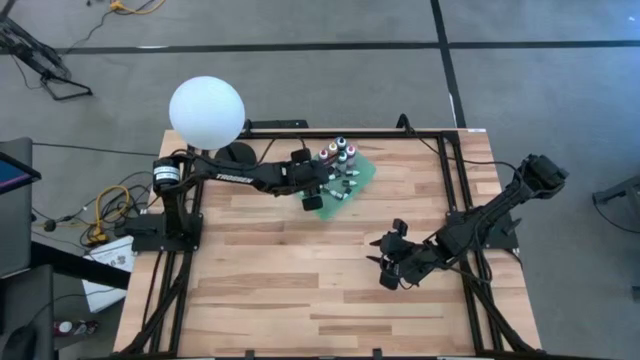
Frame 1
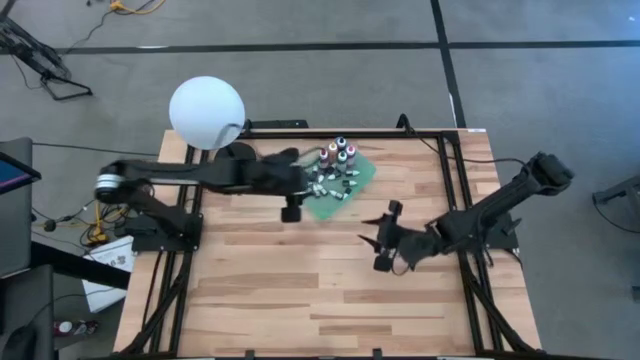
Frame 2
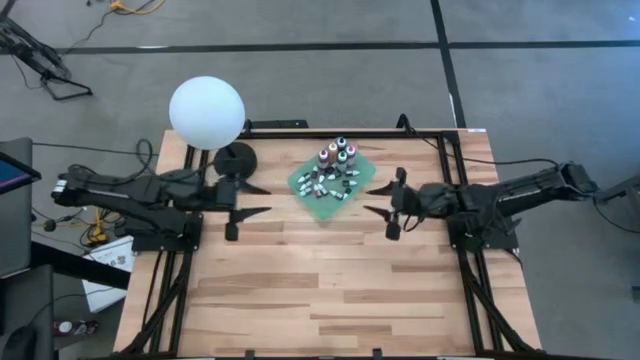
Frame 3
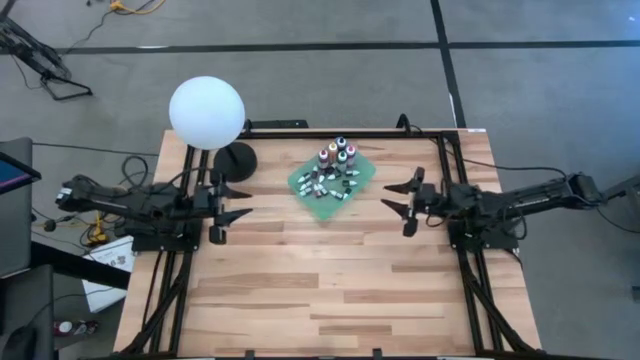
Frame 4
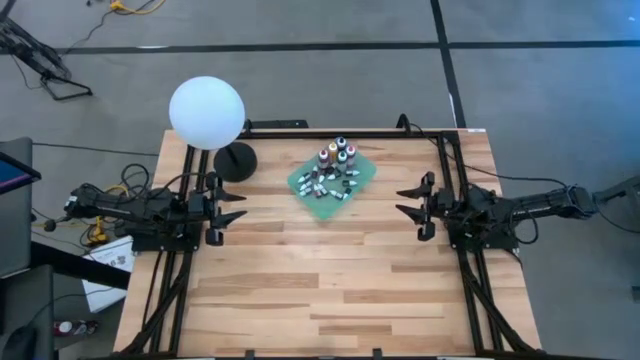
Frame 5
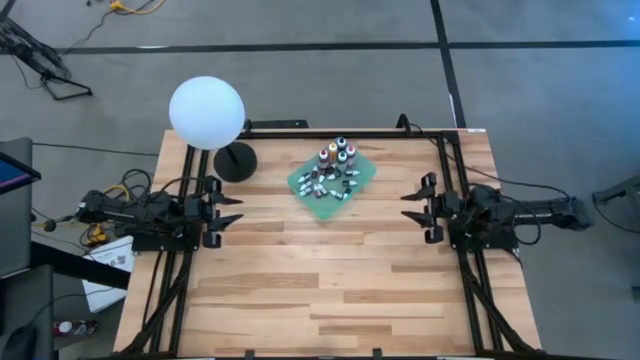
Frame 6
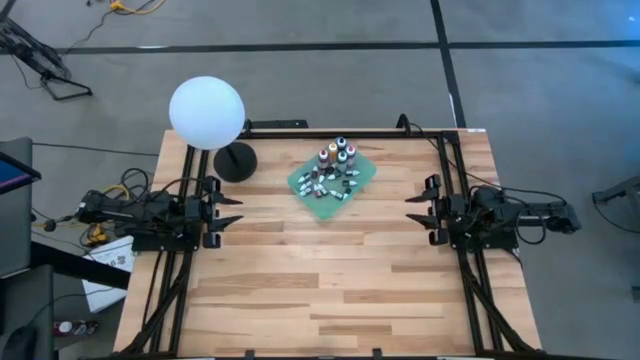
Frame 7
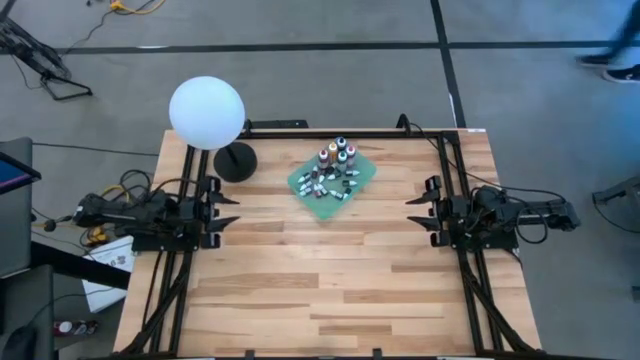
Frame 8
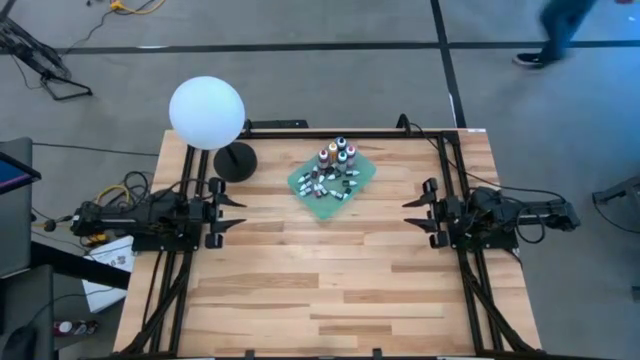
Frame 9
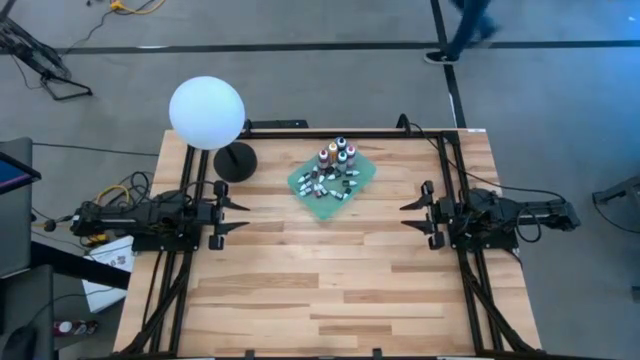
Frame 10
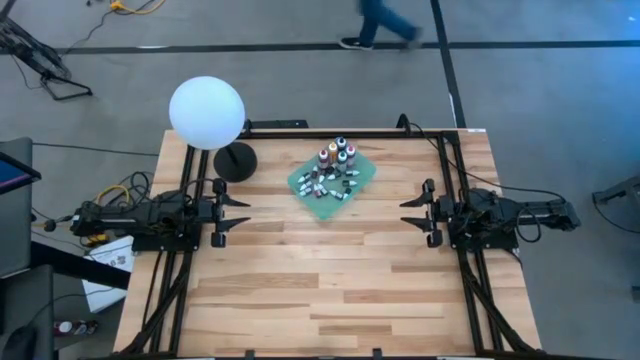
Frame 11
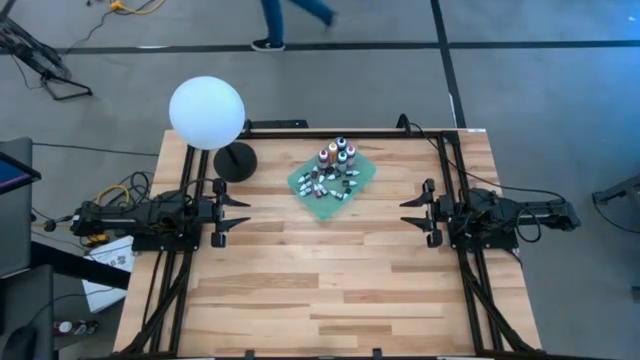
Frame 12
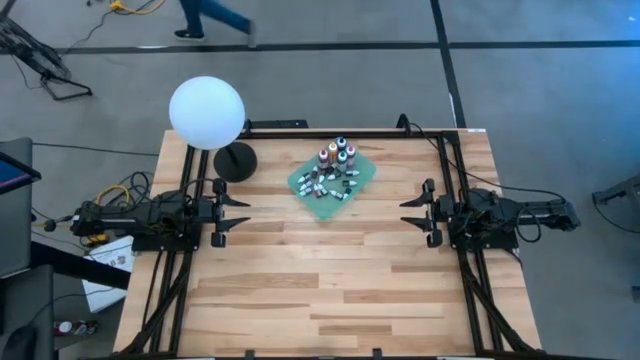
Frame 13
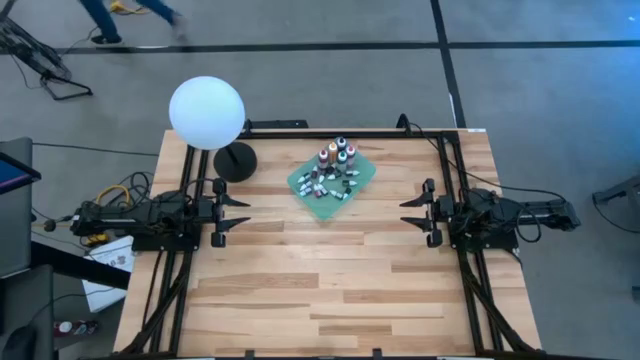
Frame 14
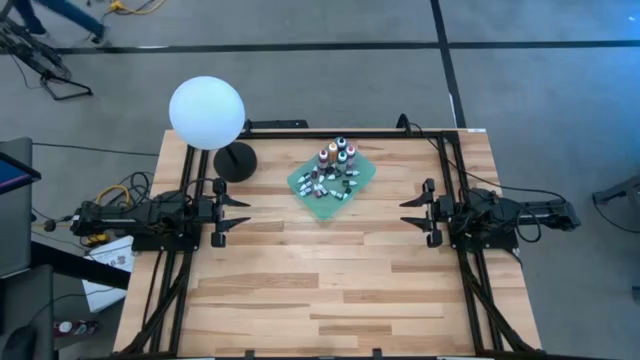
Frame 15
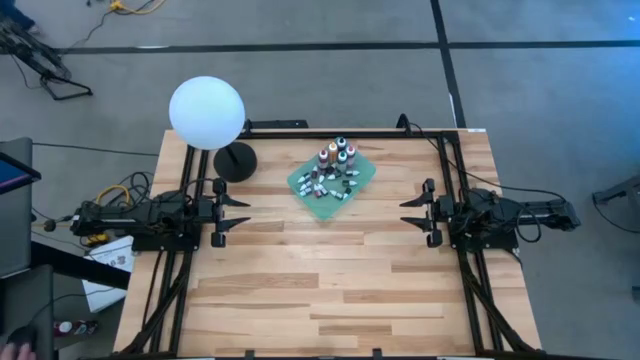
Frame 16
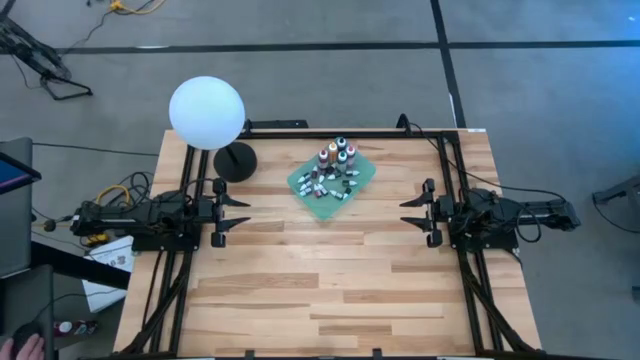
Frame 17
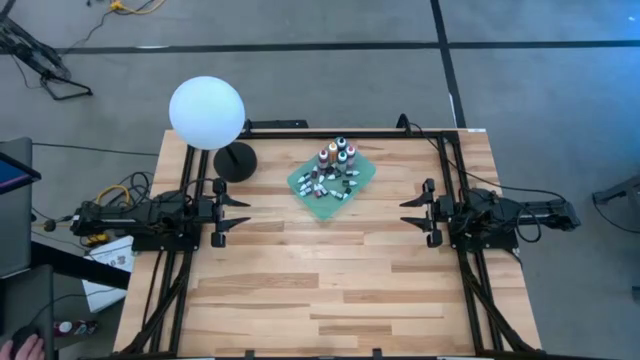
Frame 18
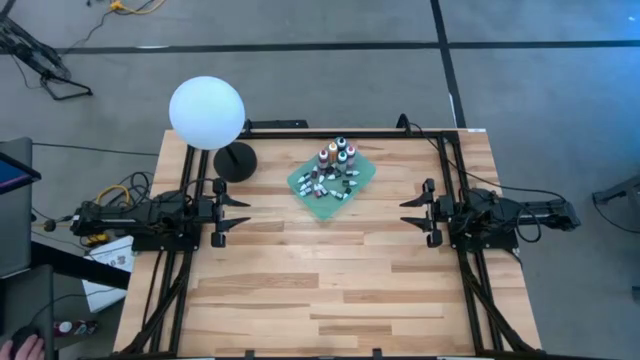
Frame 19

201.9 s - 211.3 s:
Task: Pick & Place food coloring
Return to Home Position
